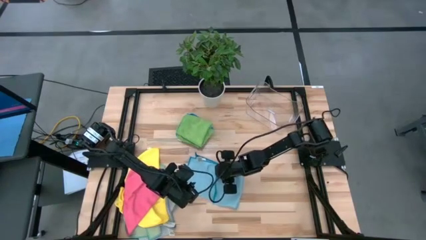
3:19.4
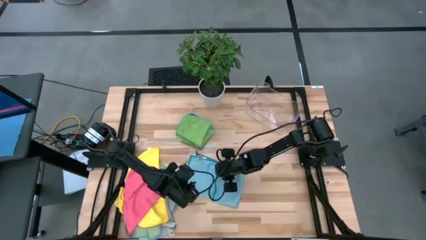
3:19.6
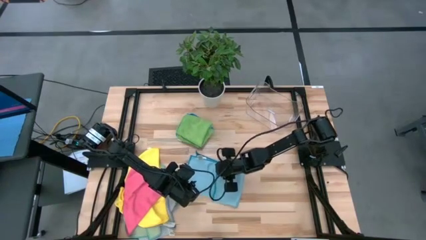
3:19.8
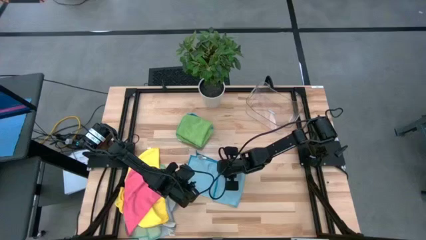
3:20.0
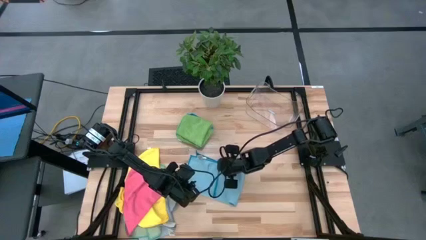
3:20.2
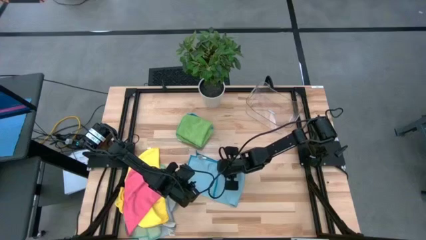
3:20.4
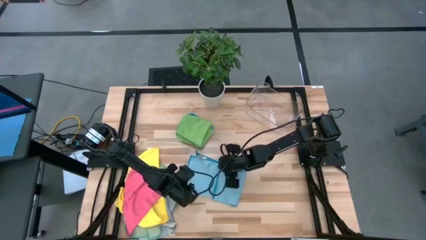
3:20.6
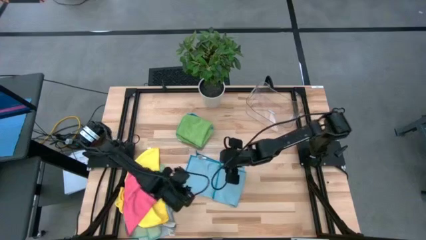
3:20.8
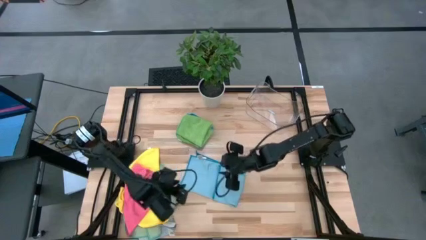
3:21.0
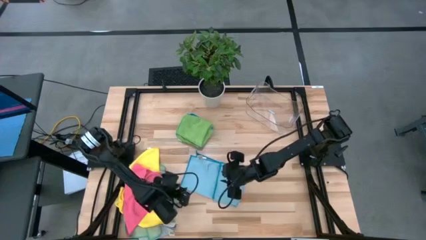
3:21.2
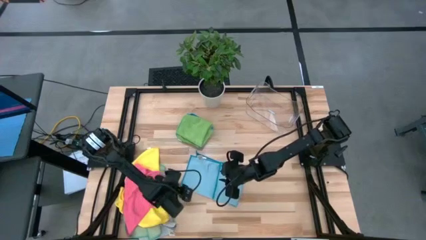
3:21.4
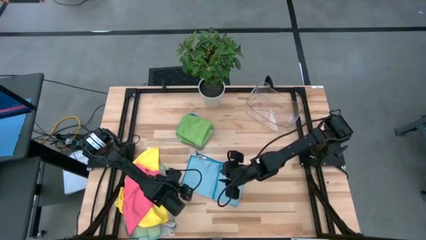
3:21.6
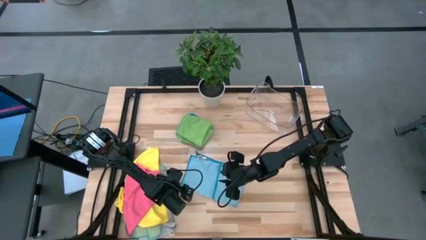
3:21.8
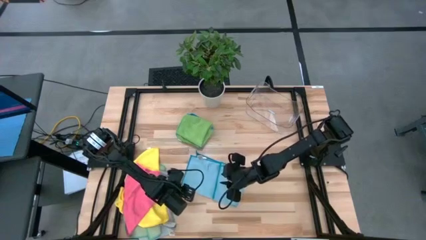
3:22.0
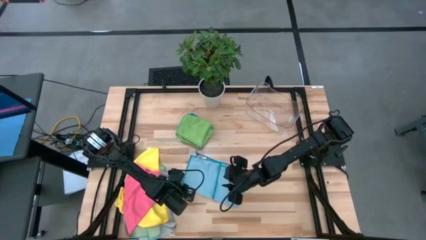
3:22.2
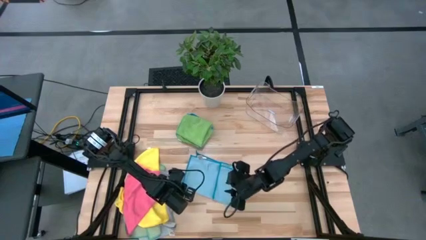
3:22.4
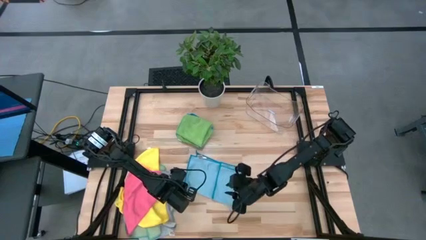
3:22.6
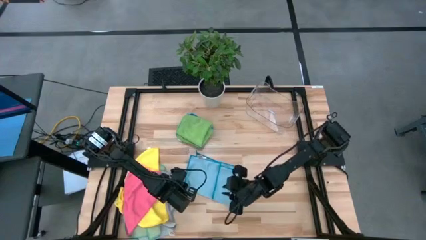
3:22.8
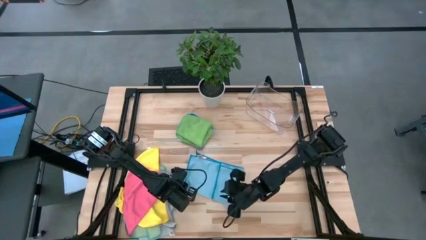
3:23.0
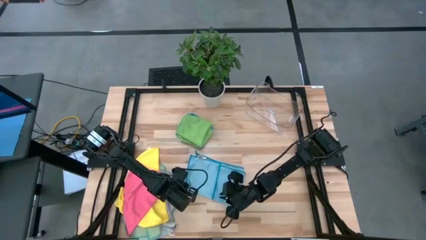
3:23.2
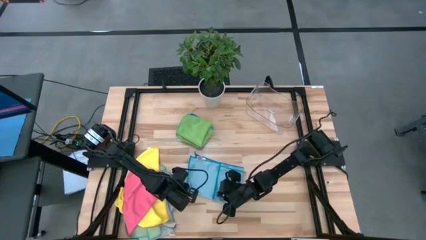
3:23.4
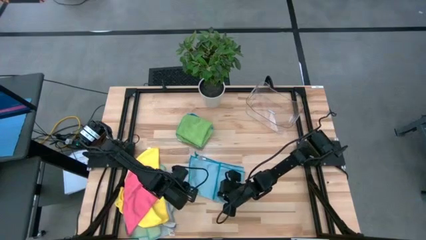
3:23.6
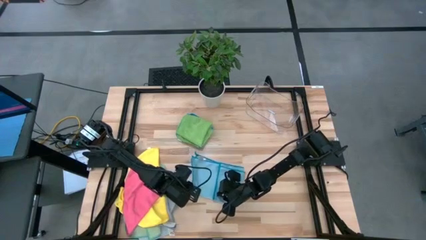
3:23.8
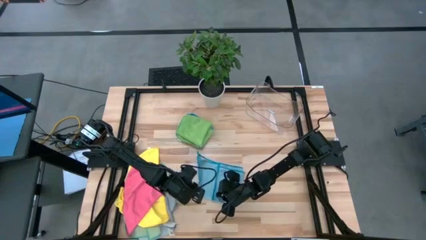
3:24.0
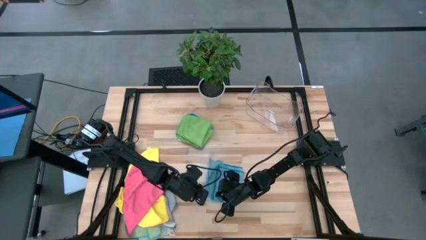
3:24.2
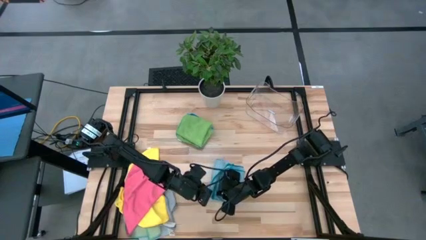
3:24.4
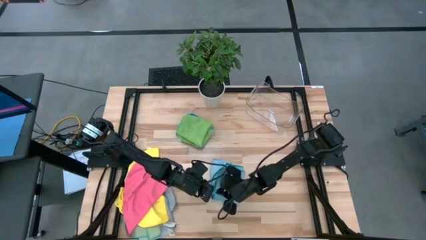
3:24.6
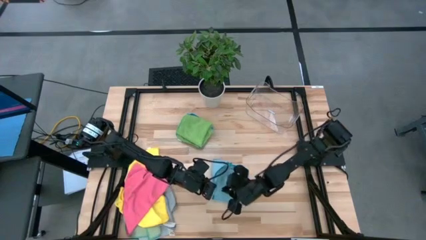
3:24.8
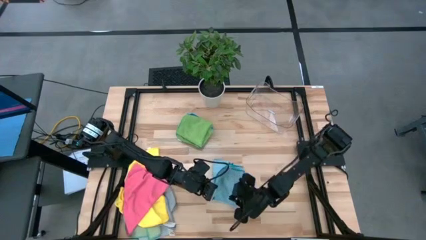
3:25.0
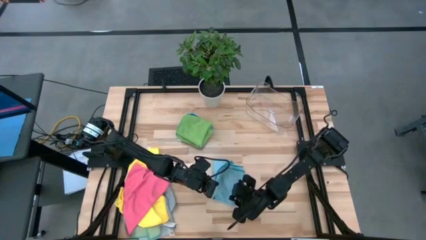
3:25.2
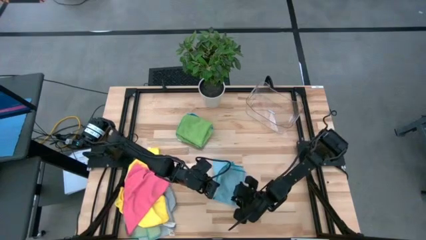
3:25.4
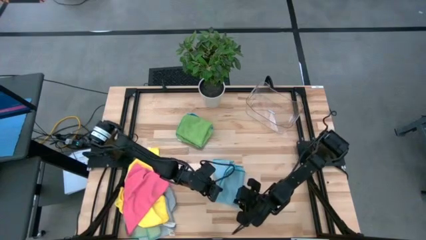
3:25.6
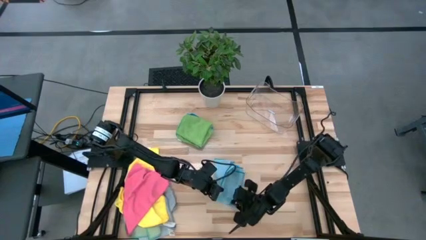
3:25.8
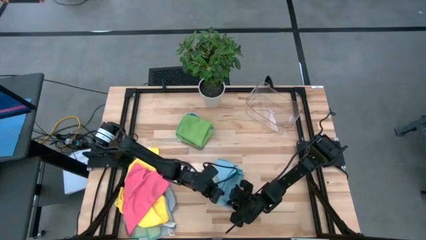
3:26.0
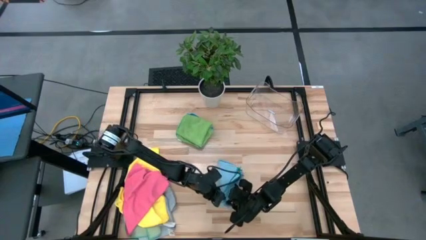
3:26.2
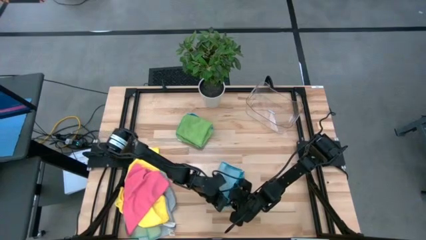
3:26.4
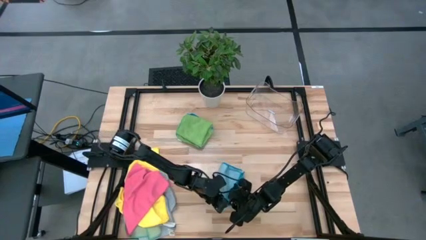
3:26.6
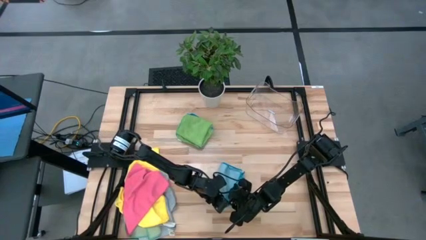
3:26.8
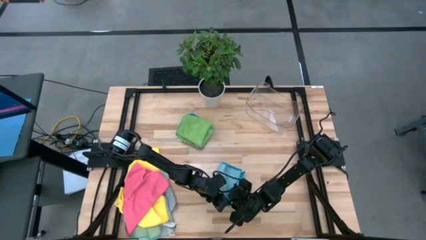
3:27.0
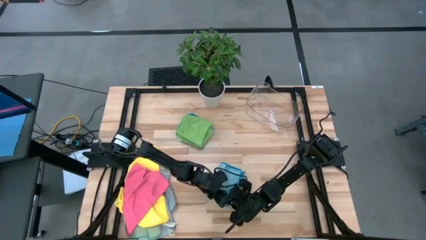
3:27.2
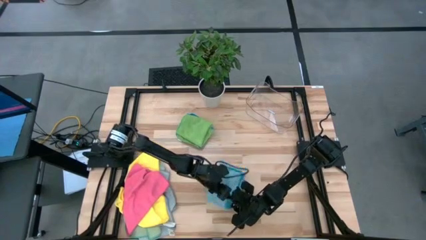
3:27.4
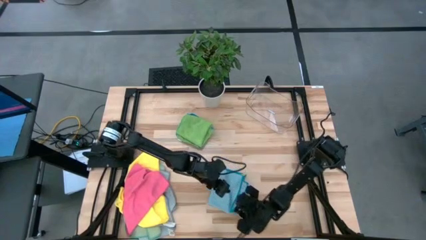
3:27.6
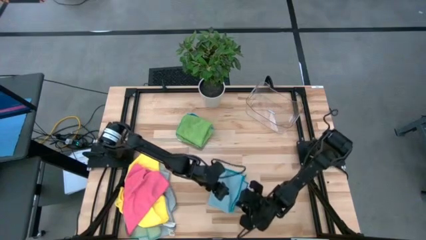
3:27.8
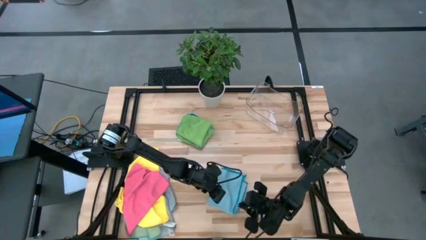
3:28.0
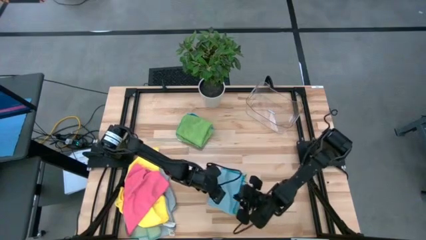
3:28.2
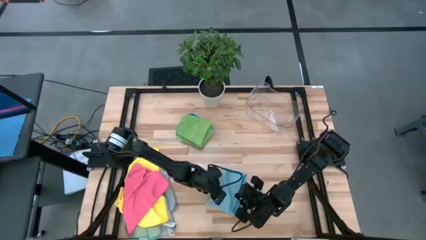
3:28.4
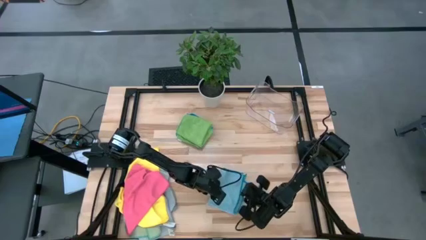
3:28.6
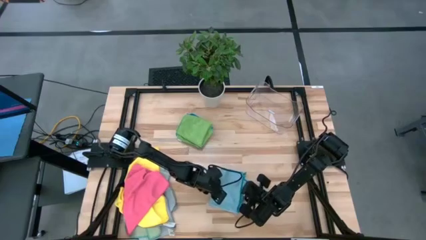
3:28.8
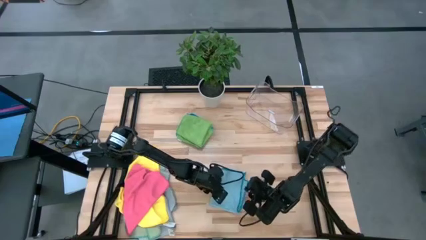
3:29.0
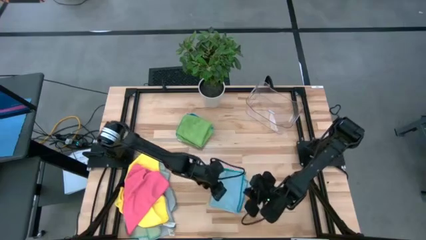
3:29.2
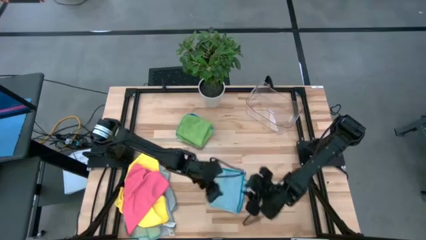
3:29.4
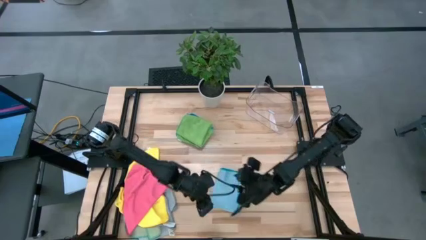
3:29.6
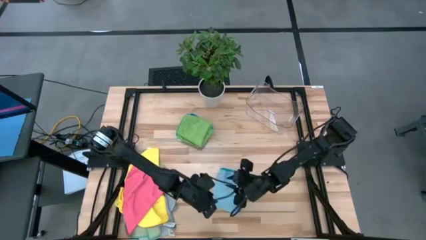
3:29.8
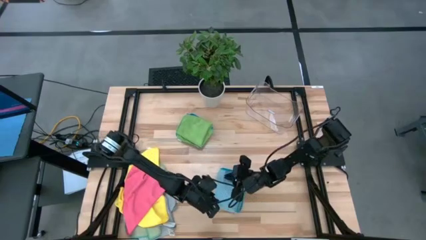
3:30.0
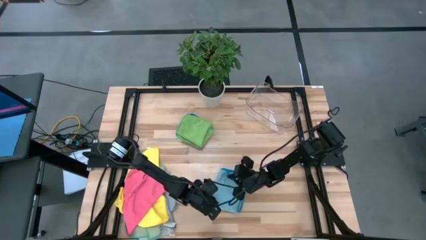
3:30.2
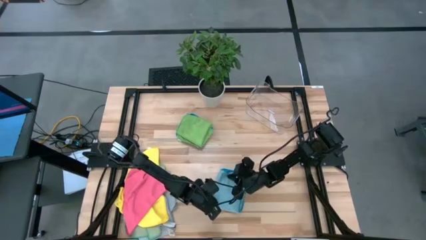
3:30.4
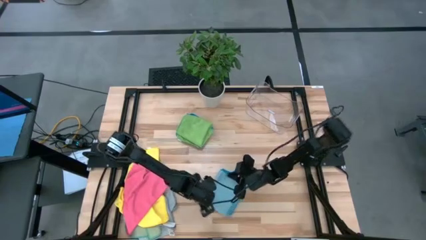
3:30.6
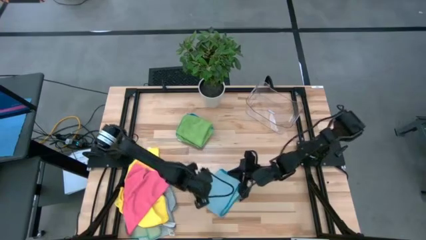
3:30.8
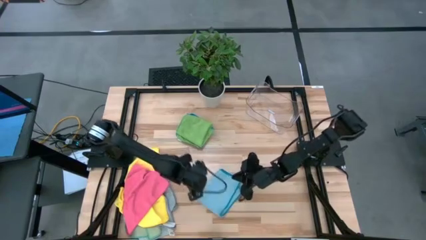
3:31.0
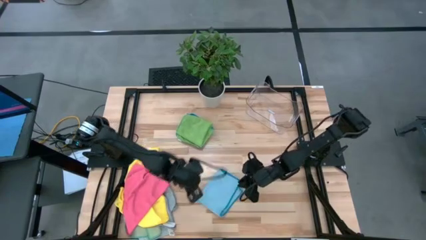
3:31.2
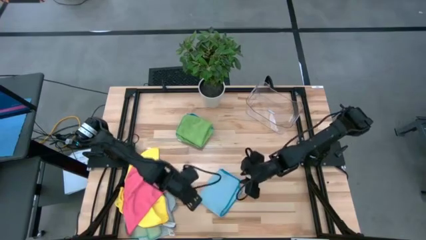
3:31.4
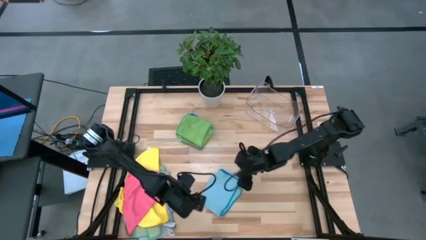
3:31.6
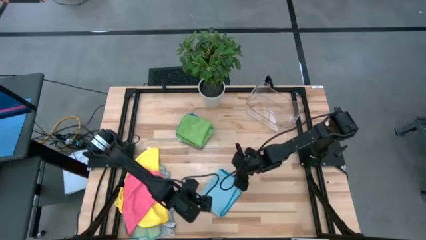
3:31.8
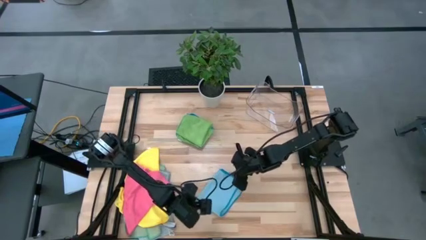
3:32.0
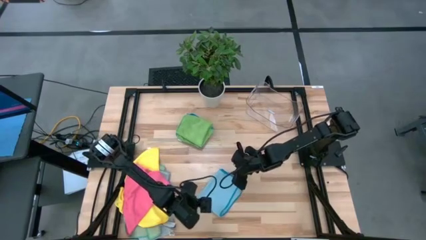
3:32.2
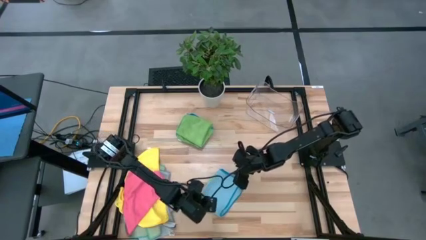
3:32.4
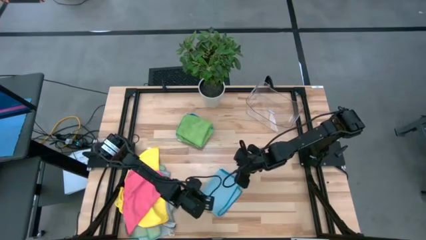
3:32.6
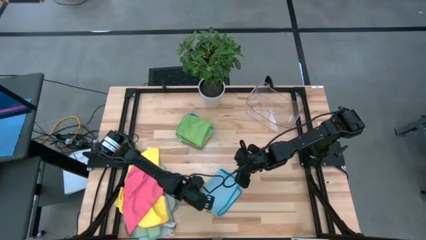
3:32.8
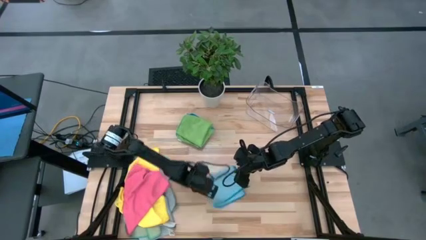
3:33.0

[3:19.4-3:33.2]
Task: Fold microfiber towels
Fold the light blue microfiber towel

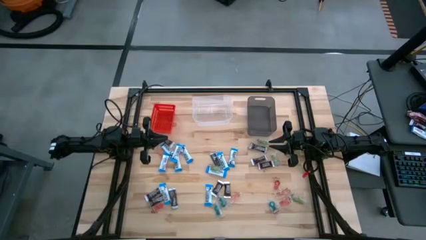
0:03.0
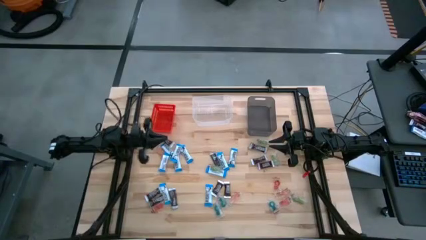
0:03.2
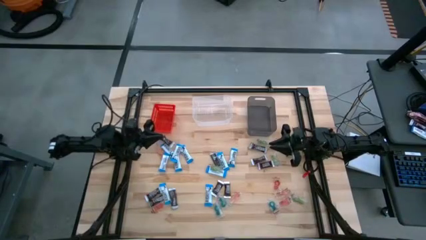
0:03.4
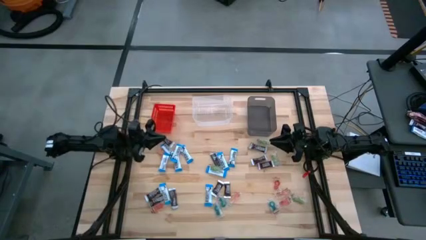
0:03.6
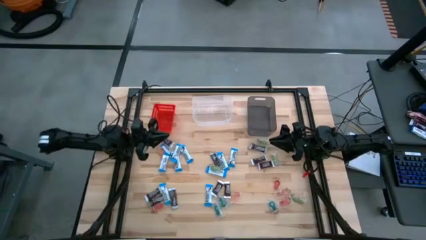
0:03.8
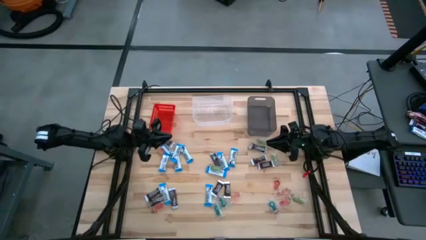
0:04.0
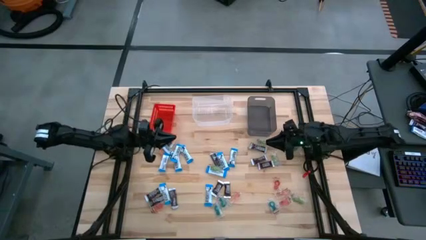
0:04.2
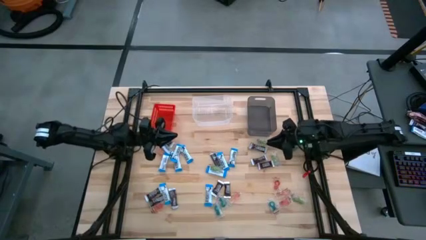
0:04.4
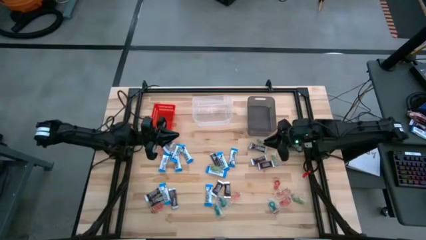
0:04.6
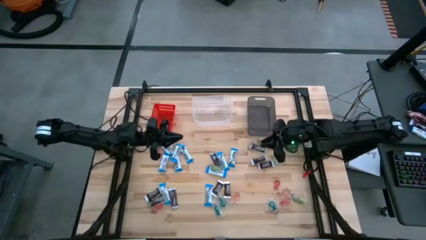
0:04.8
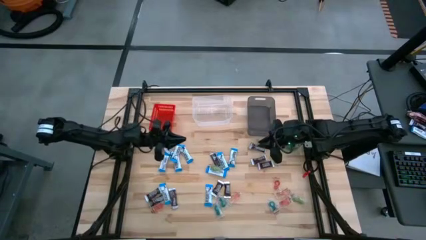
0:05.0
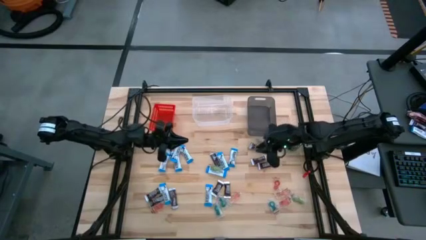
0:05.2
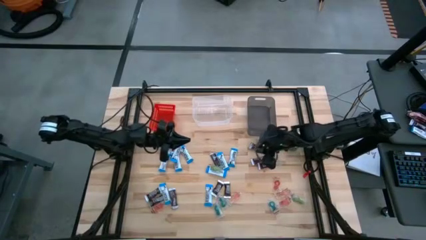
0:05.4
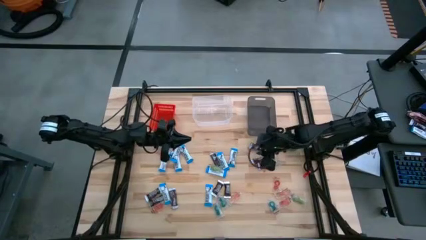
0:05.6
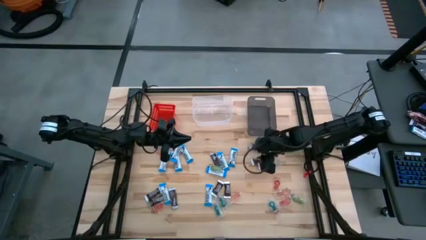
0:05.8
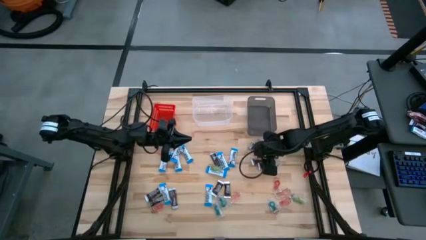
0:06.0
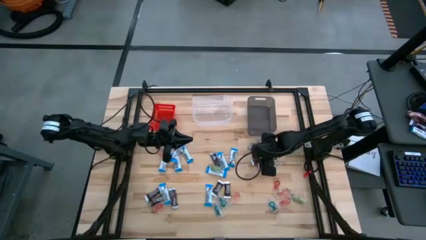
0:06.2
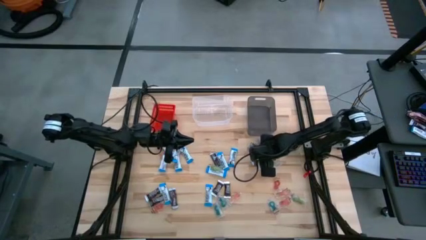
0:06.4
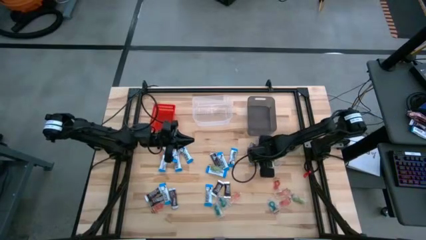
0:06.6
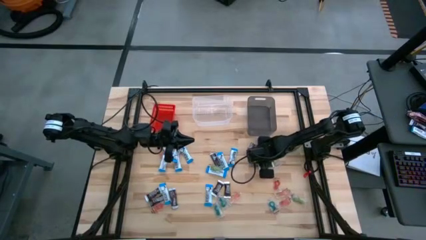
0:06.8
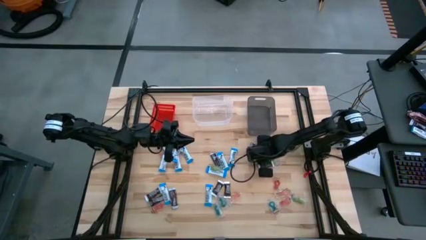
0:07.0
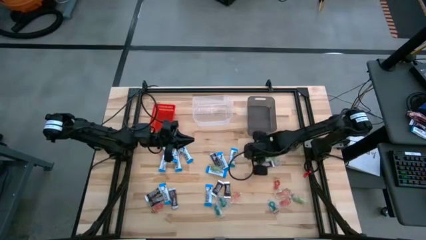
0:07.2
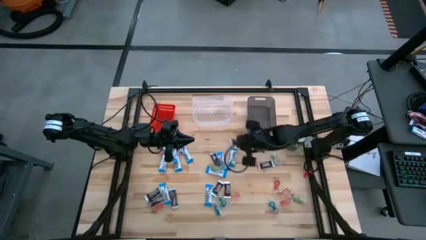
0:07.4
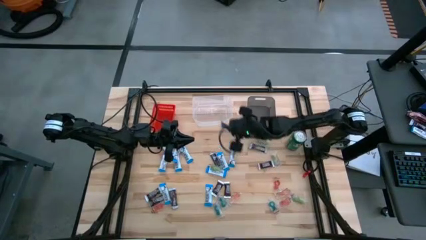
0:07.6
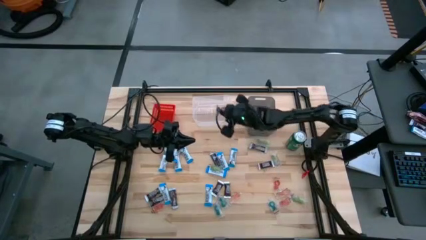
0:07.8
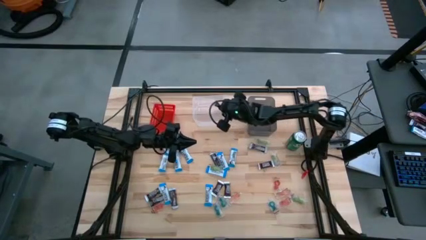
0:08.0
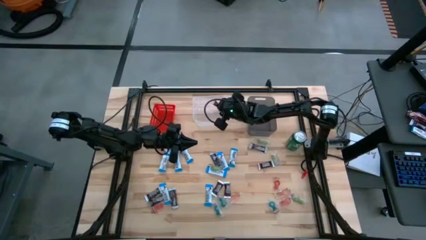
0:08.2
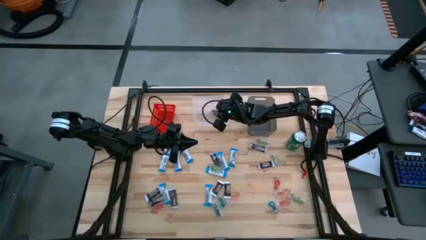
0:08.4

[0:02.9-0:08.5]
Task: Sort candy
Put the black chocolate bar into the transparent bin
